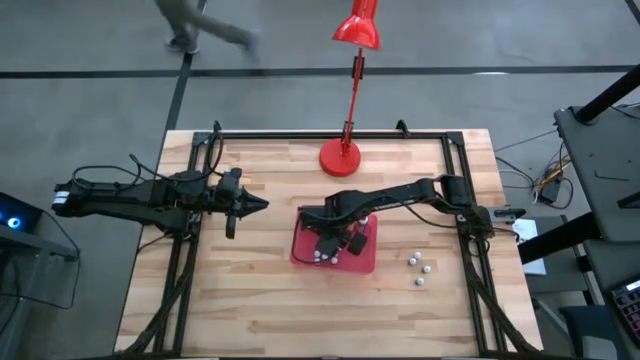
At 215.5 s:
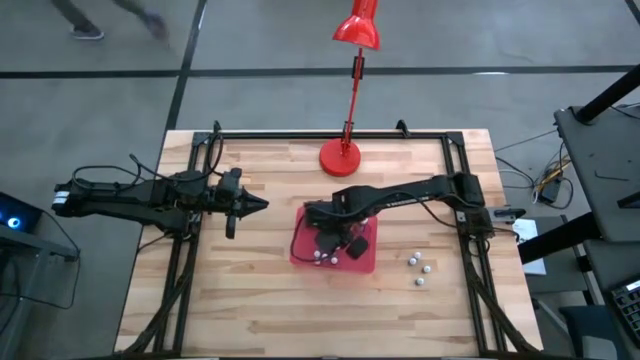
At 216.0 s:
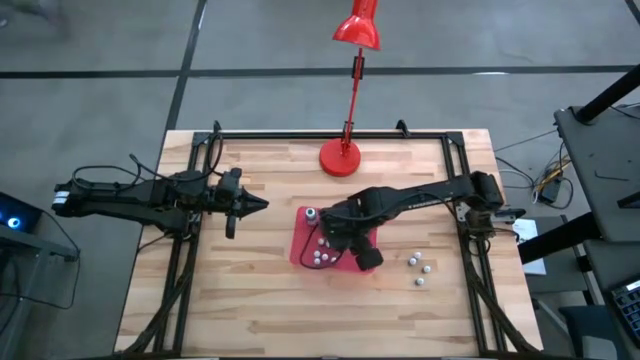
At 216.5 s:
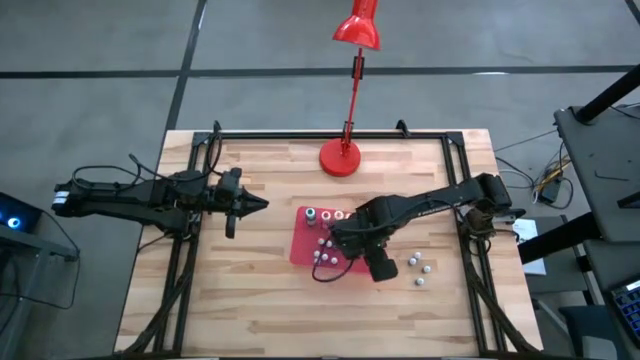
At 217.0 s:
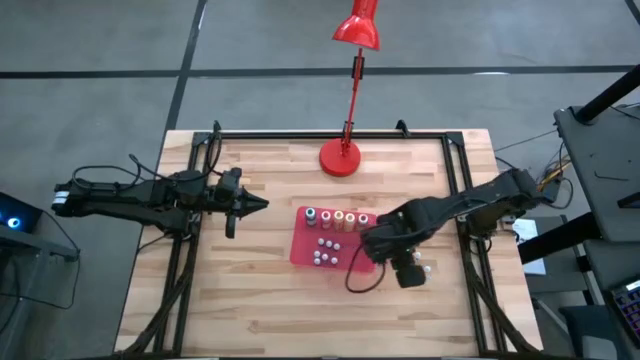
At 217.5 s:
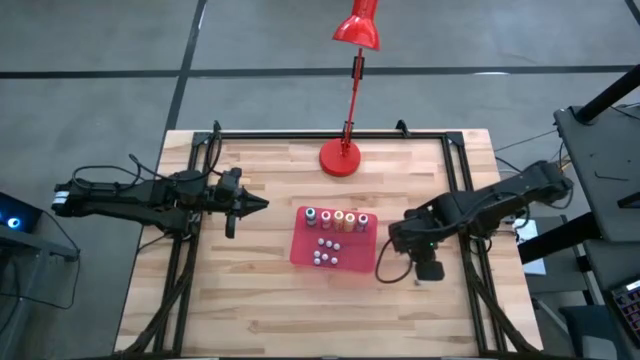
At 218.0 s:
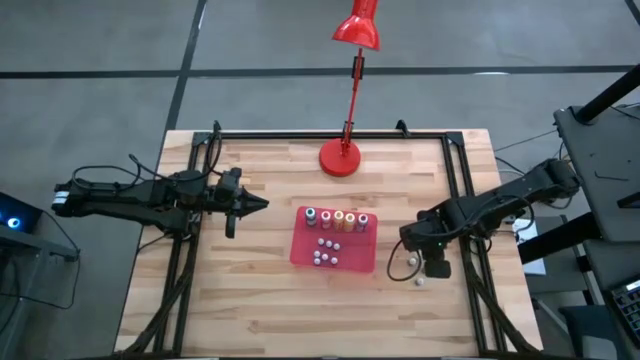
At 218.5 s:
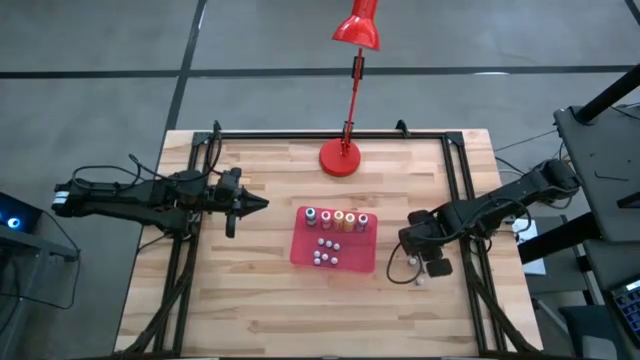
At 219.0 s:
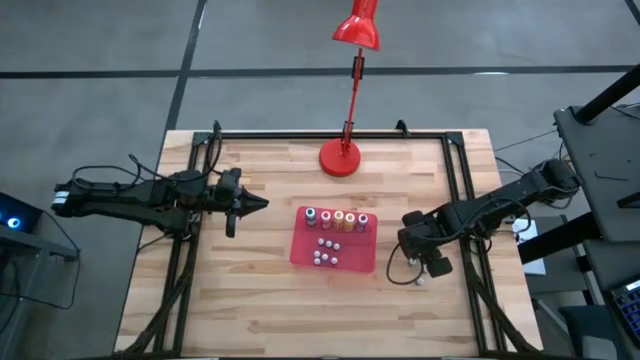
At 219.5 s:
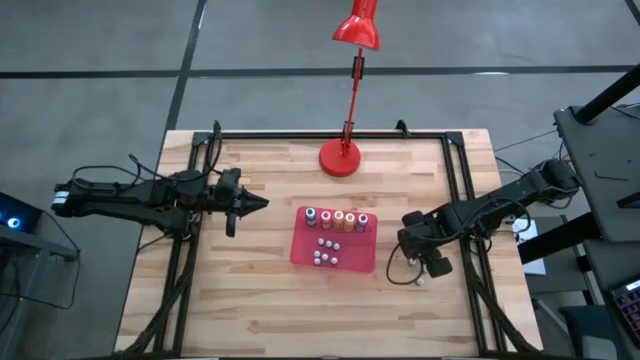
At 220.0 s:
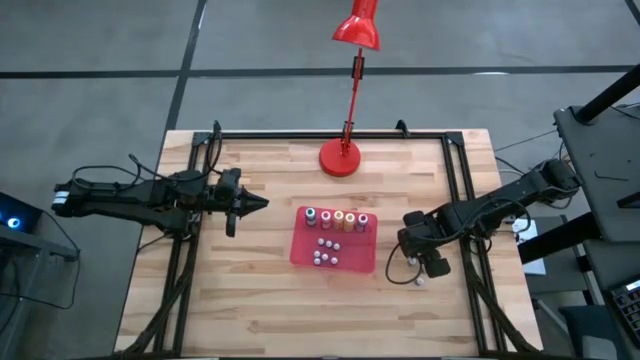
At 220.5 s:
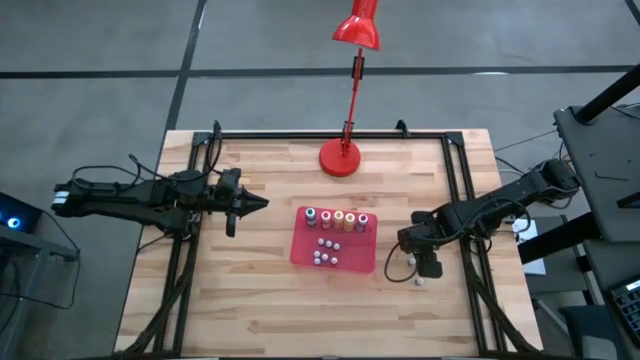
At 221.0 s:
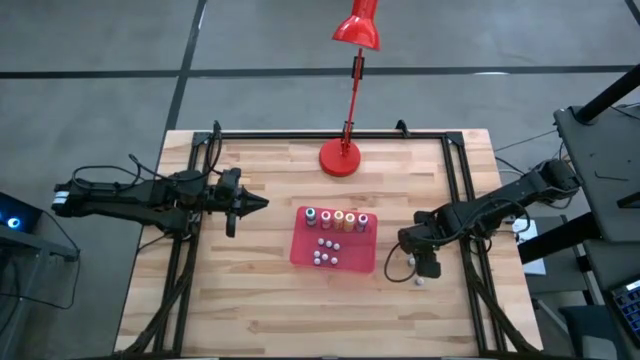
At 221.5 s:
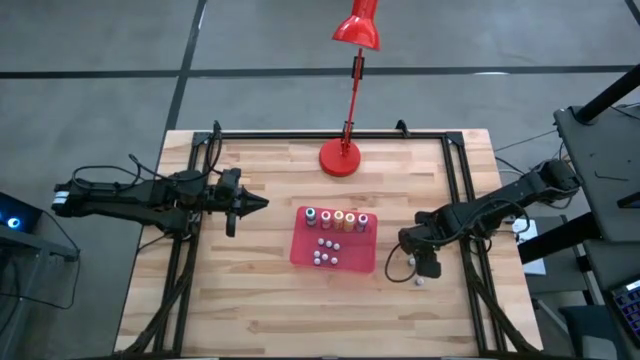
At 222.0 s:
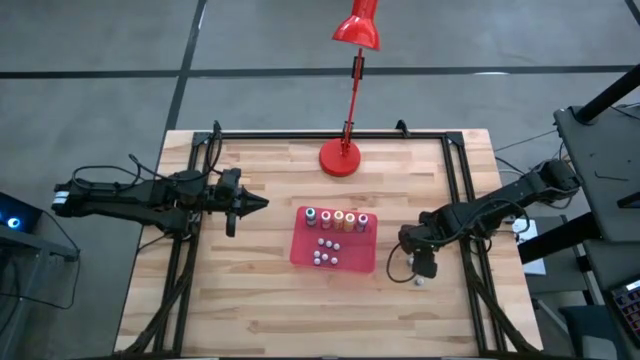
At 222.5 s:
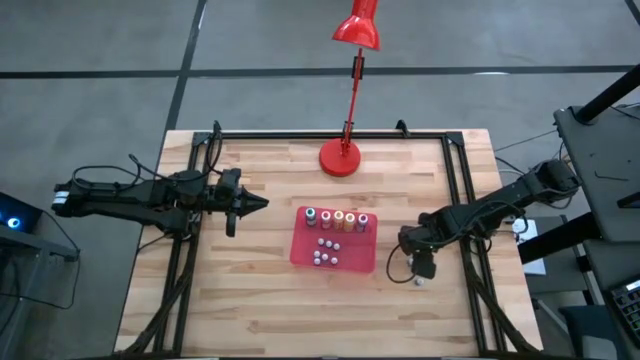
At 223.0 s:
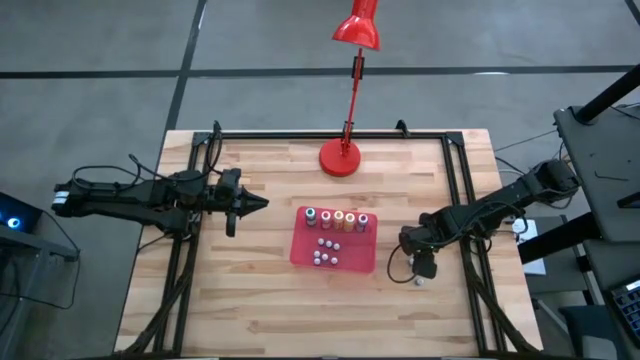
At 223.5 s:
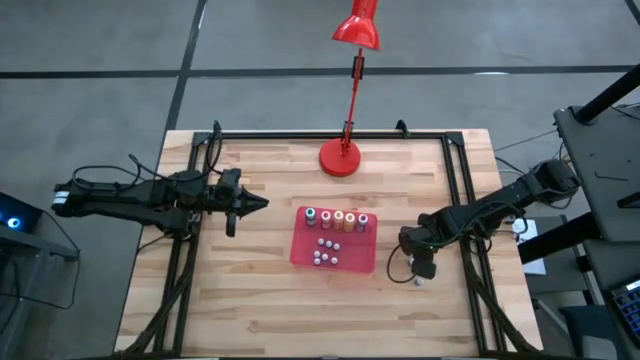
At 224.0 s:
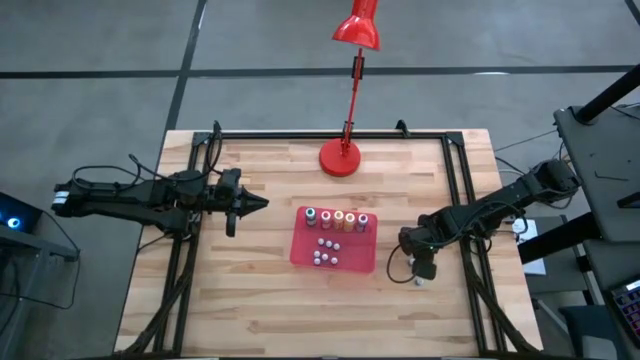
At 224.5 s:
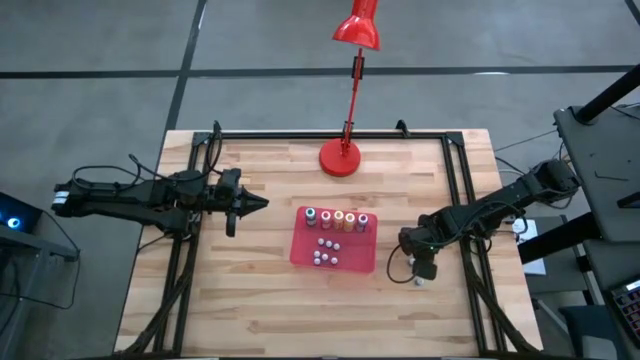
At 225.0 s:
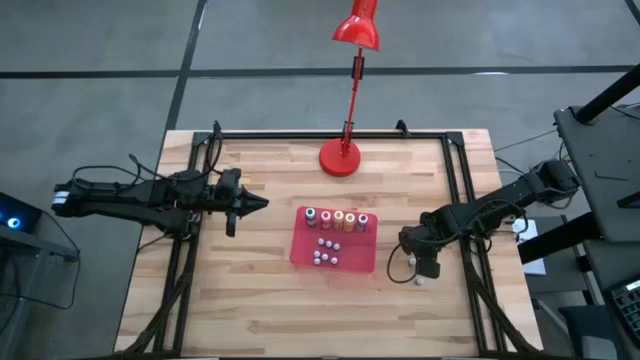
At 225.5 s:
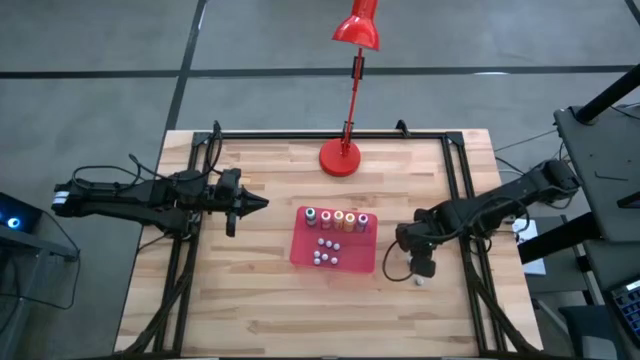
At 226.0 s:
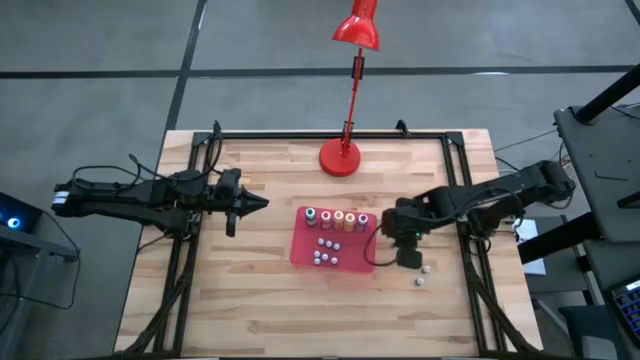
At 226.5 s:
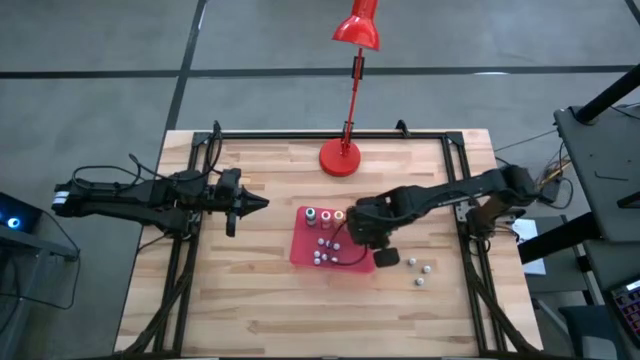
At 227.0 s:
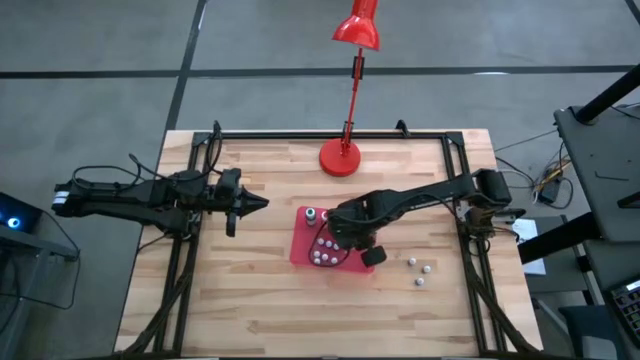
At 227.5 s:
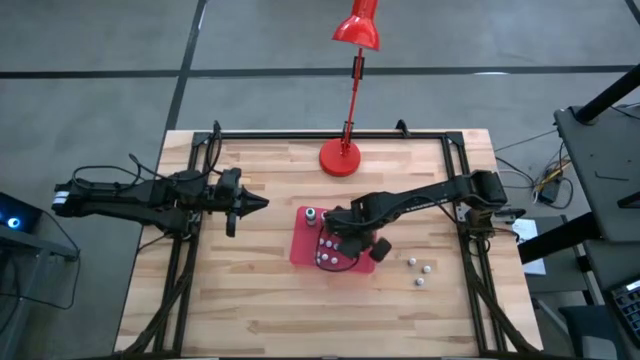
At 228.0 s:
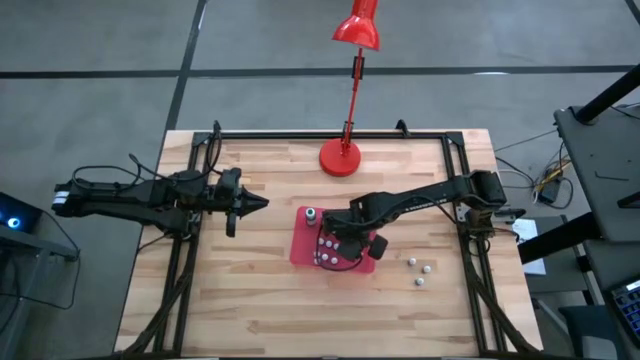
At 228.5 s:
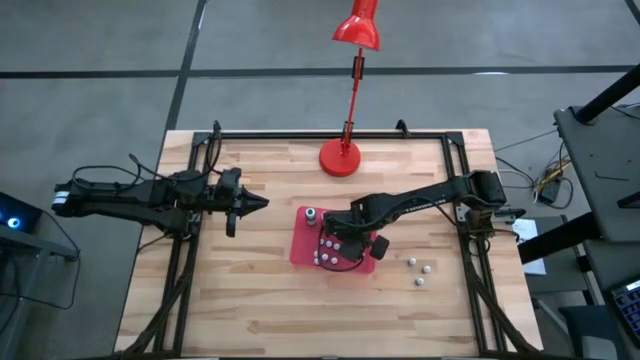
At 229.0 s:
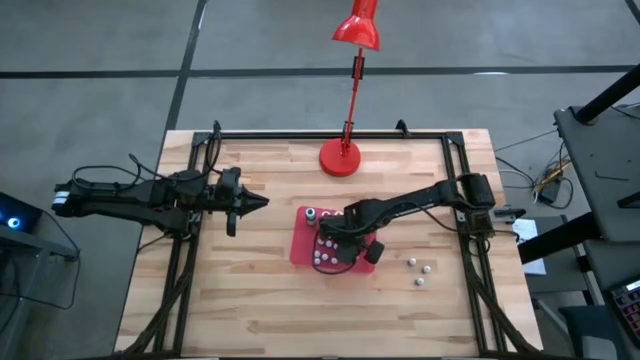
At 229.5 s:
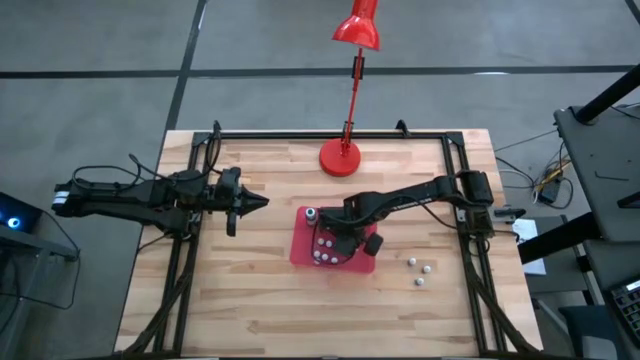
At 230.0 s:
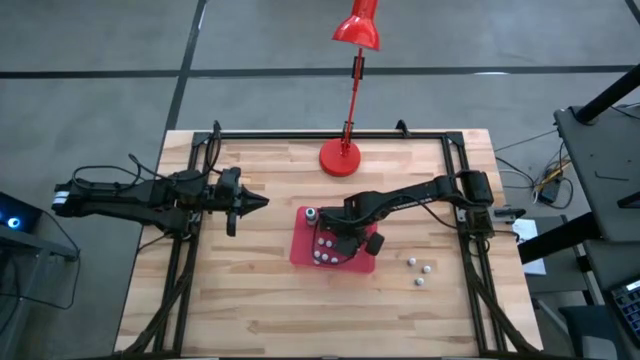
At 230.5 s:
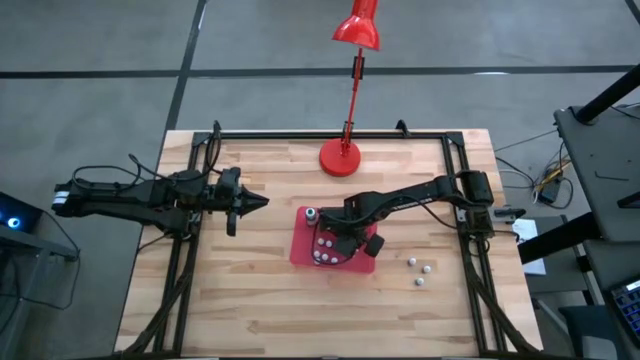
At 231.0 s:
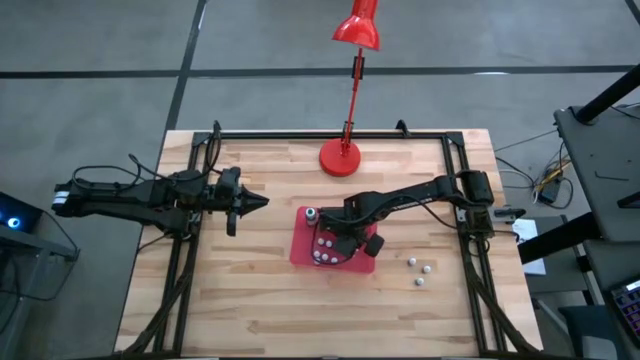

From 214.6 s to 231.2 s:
Task: Pick & Place food coloring
Put the small red food coloring bottle into the red bin

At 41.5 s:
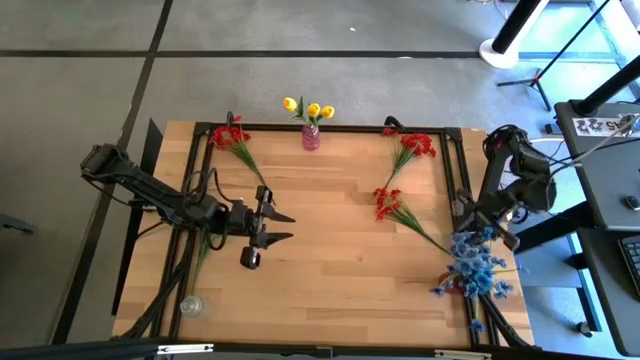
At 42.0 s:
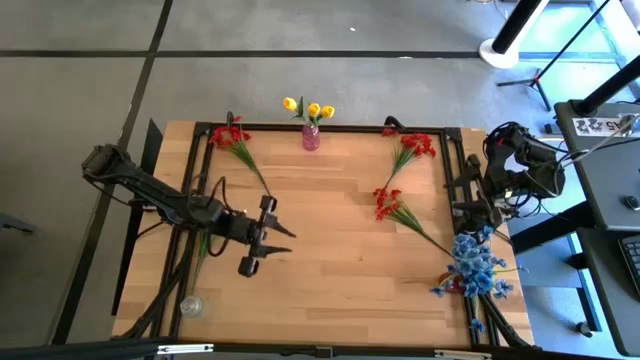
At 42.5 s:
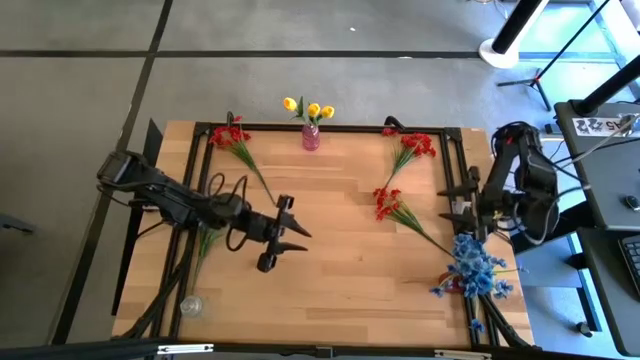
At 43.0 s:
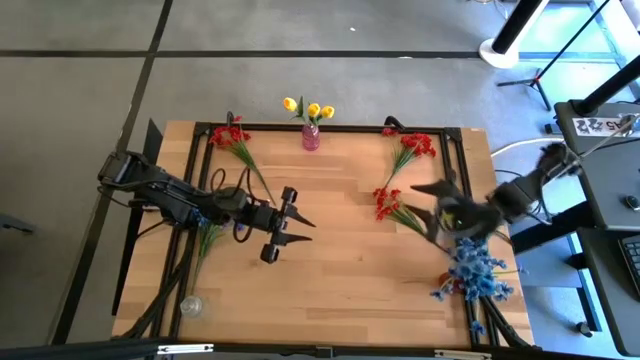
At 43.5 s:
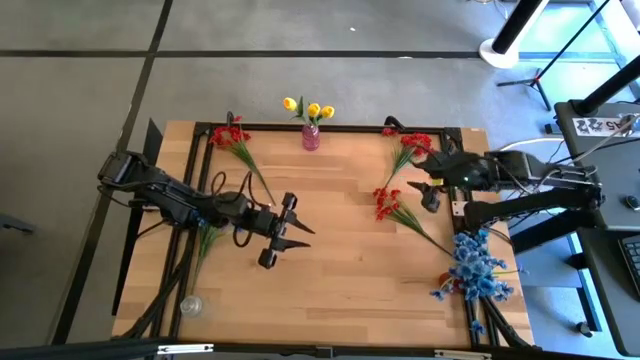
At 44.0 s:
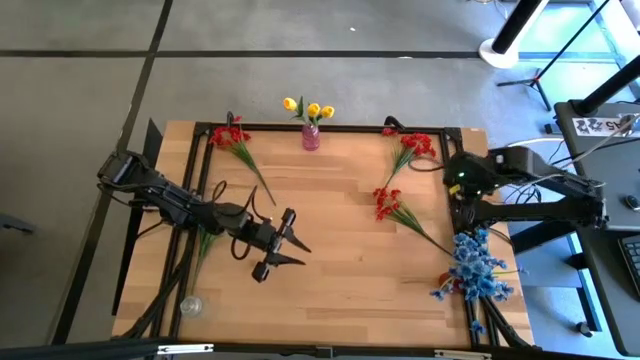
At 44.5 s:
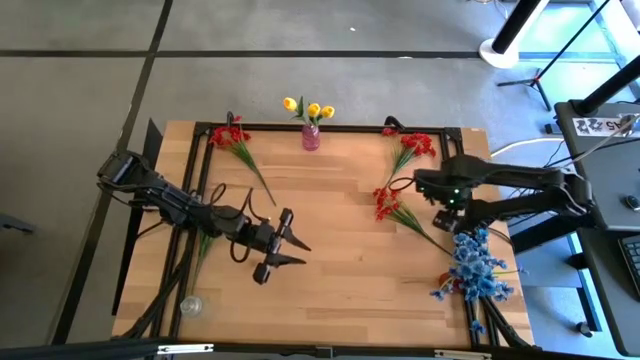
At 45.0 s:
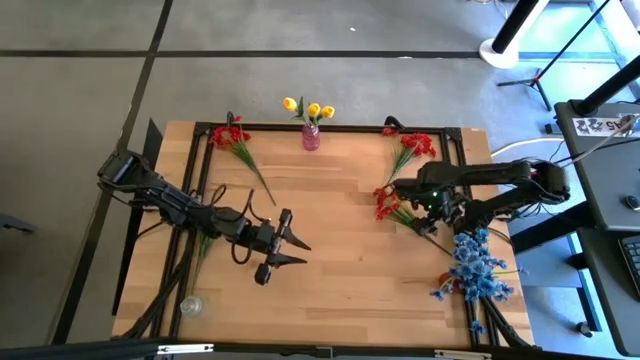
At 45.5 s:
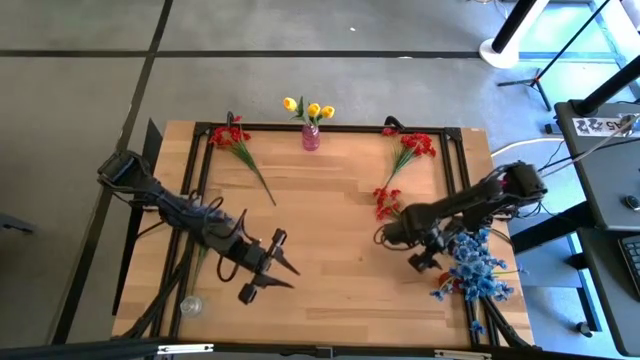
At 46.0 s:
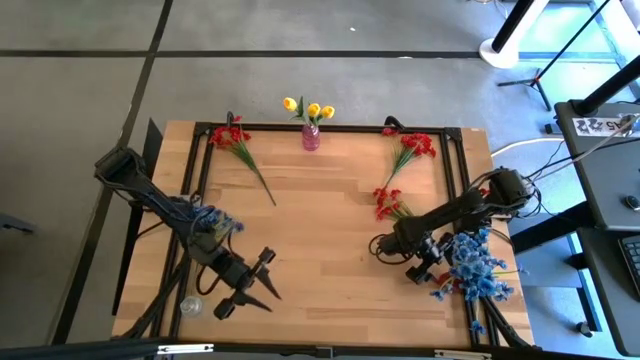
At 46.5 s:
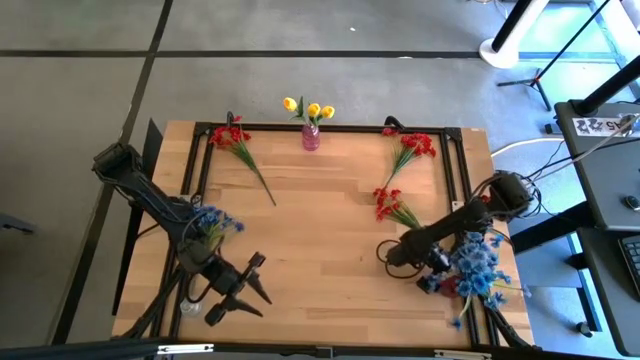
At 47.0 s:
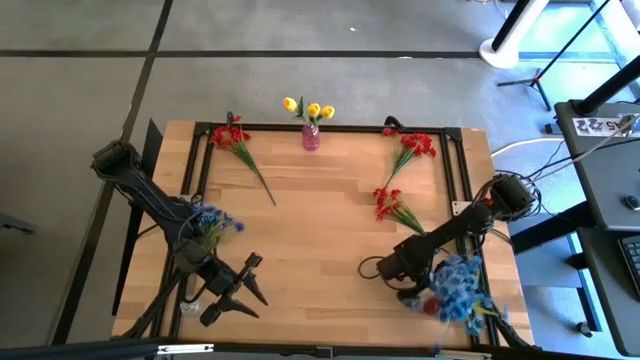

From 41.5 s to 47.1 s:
Task: Sort flowers into vase by color
Move the red vase to bottom right of the table
